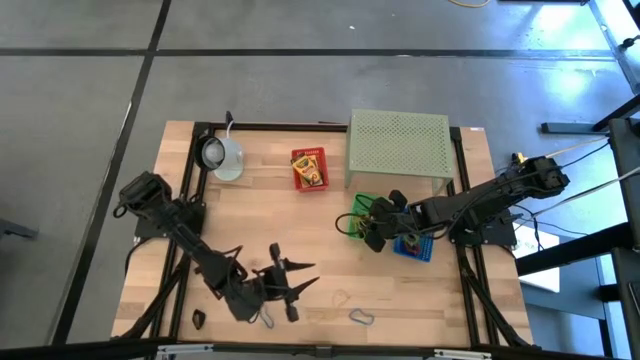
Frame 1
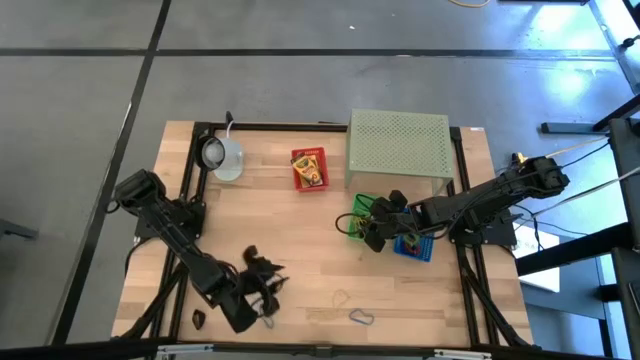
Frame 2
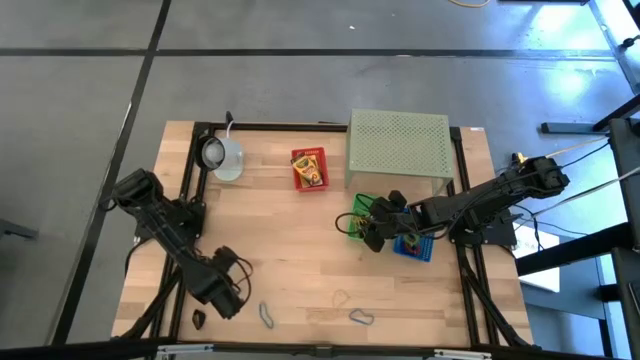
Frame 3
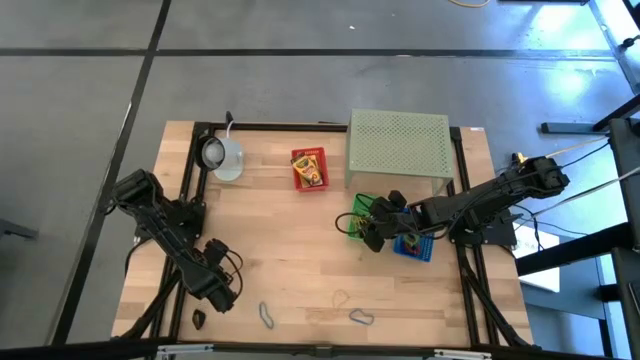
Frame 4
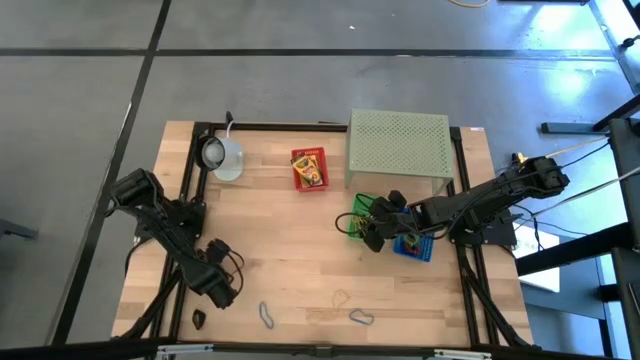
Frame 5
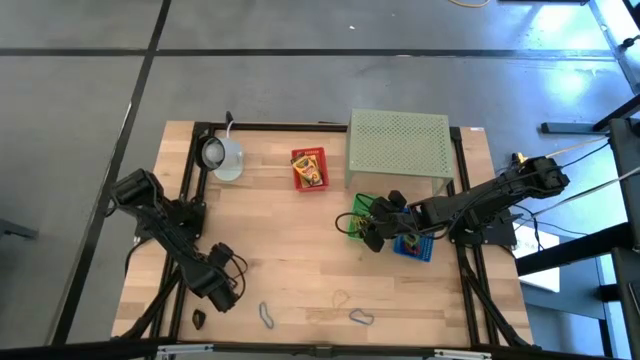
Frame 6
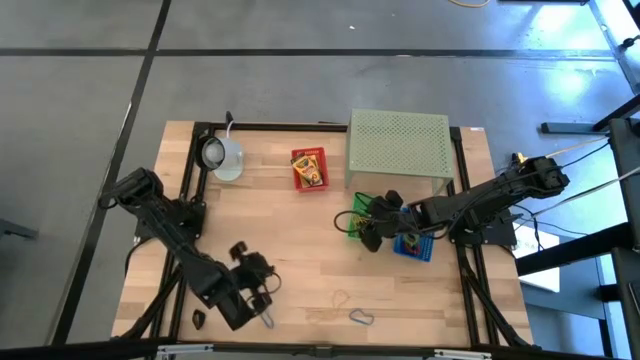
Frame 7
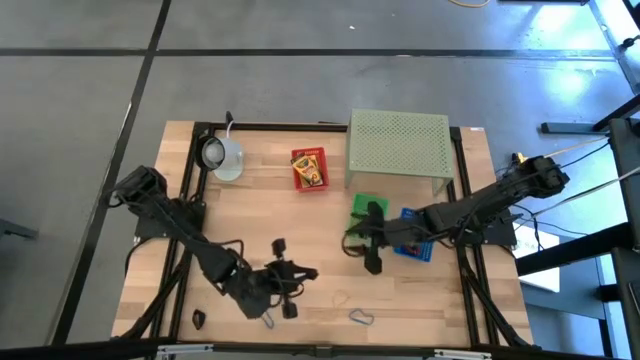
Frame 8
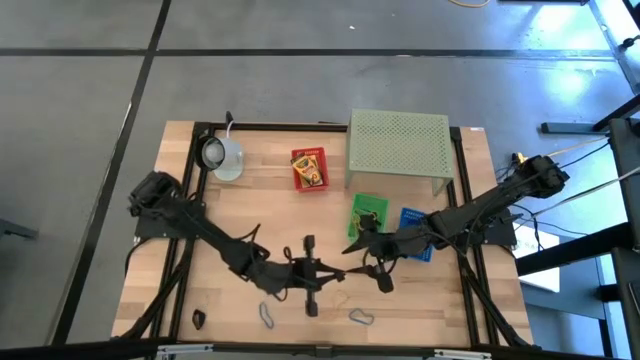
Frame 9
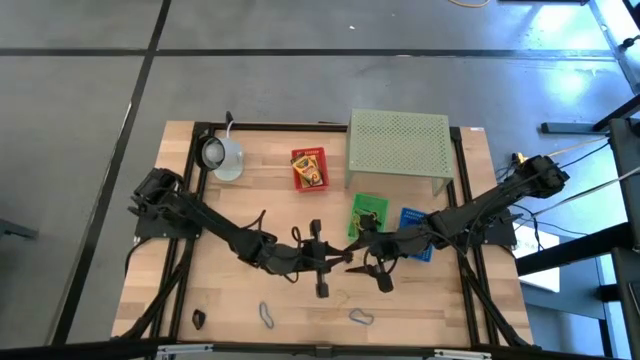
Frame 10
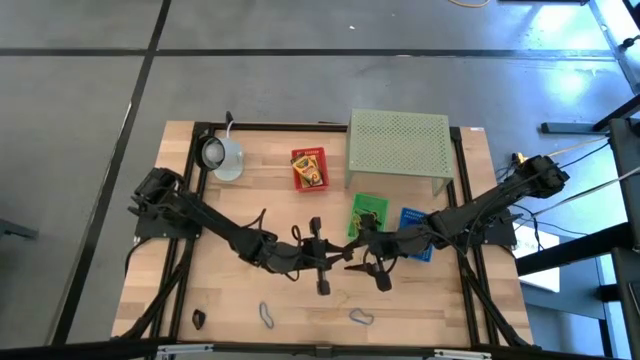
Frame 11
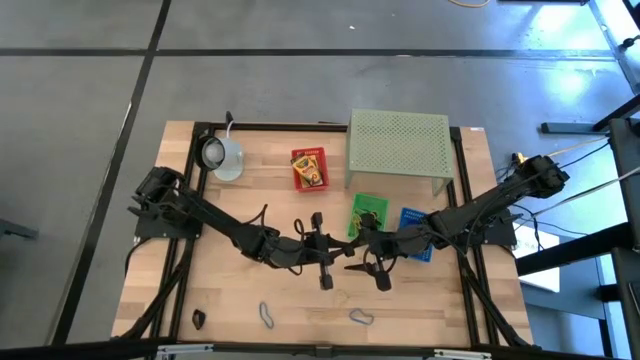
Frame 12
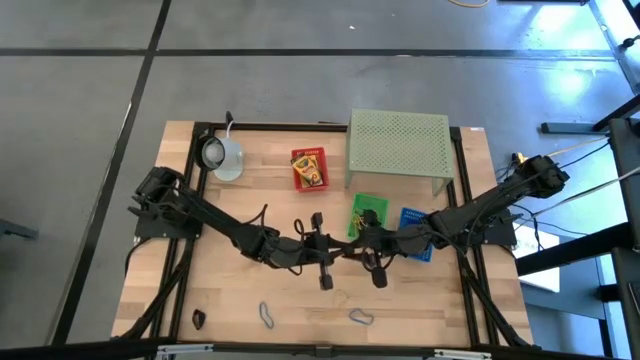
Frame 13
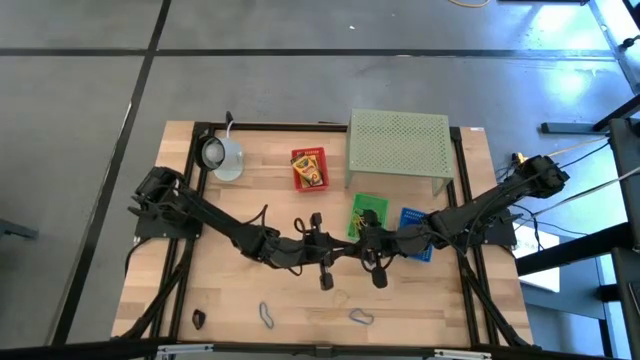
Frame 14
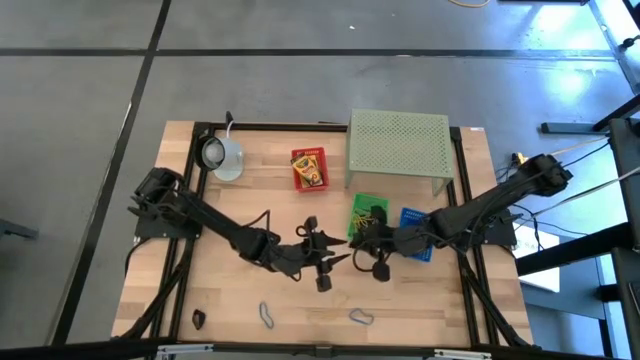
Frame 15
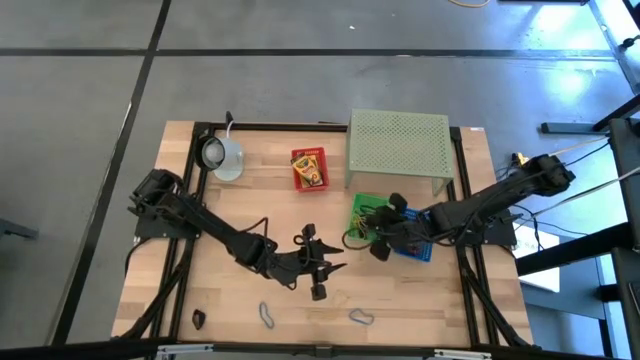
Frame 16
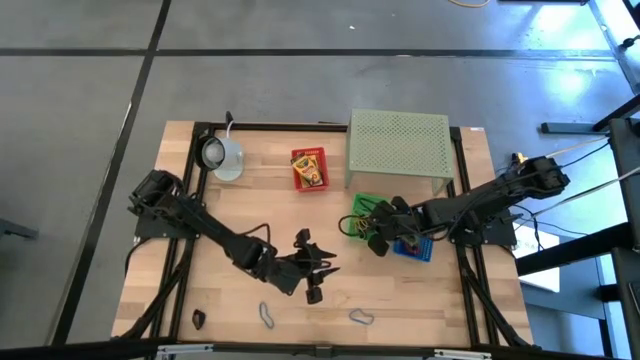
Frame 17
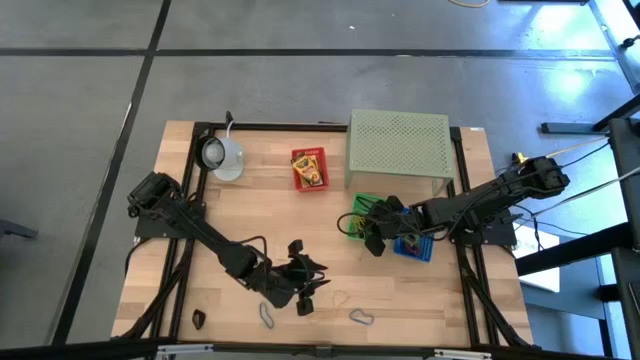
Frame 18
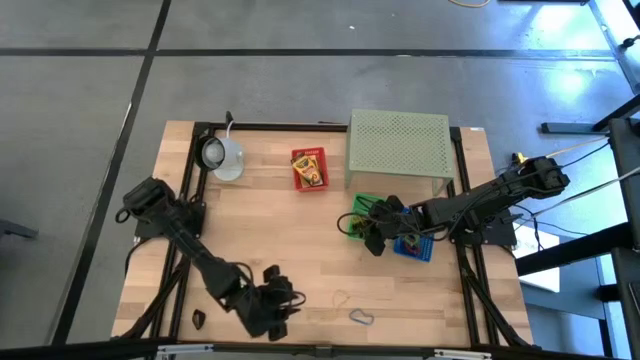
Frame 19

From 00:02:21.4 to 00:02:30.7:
Task: Pick & Place Office Desk Supplies
Put the black rubber band into the green bin

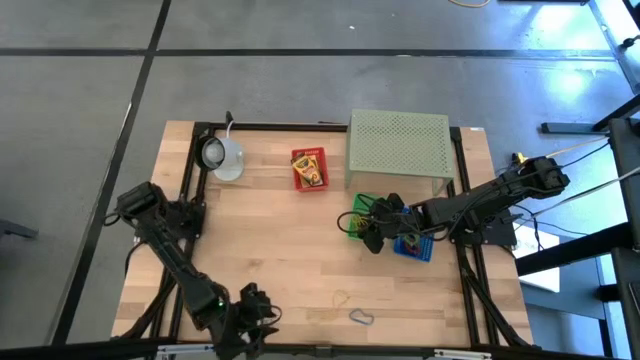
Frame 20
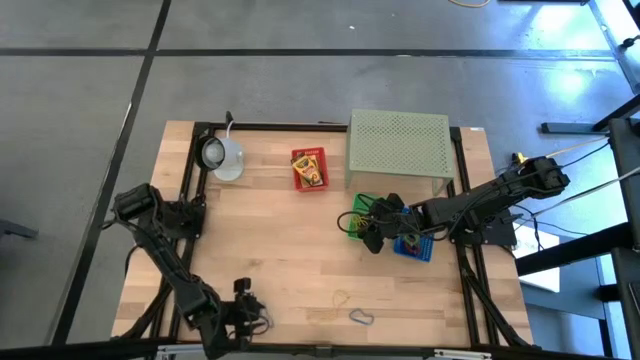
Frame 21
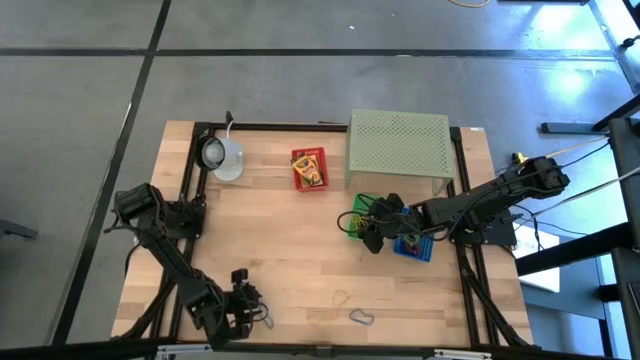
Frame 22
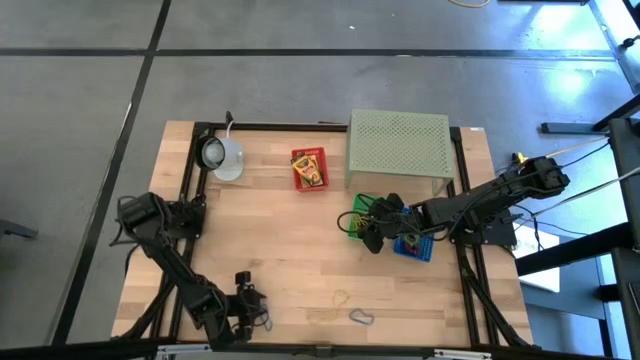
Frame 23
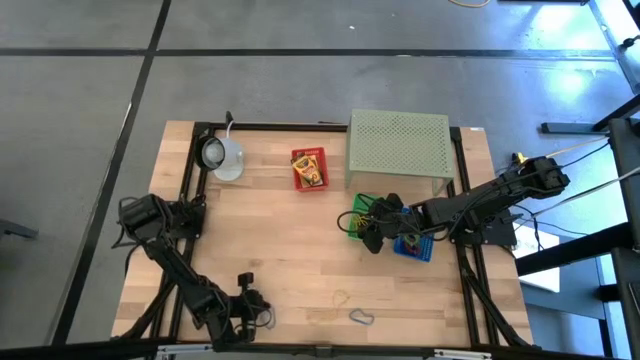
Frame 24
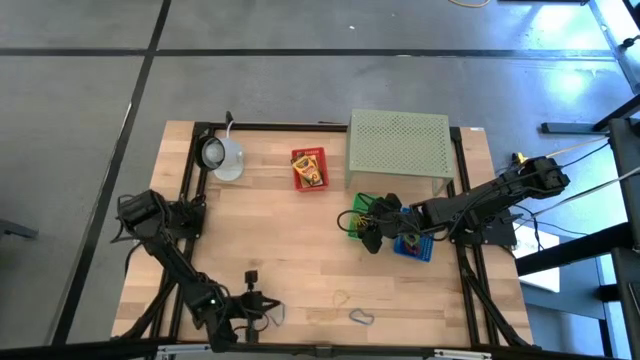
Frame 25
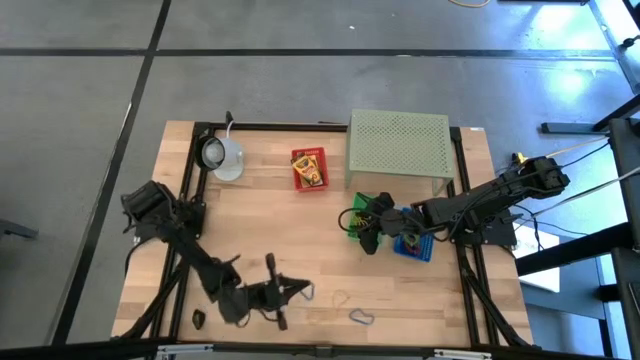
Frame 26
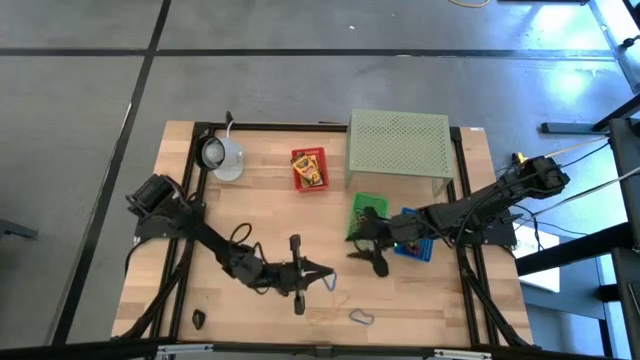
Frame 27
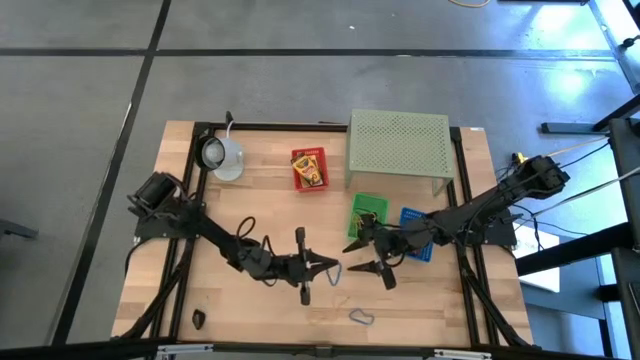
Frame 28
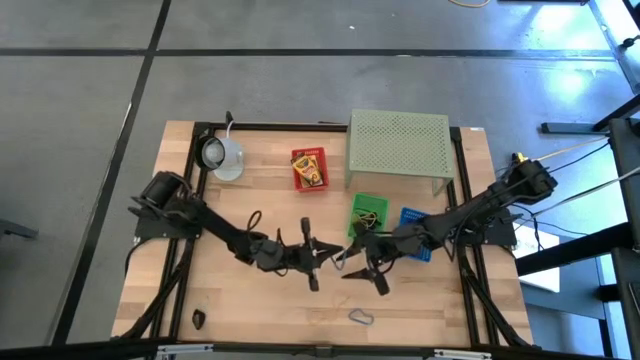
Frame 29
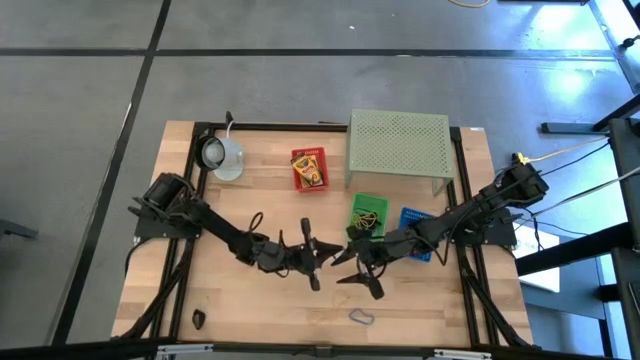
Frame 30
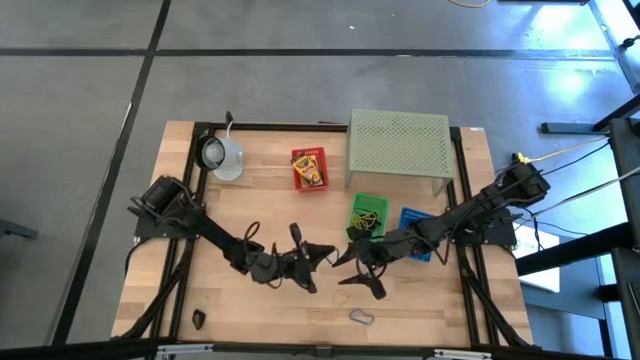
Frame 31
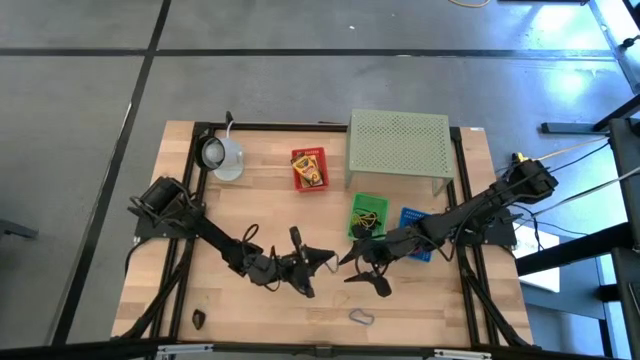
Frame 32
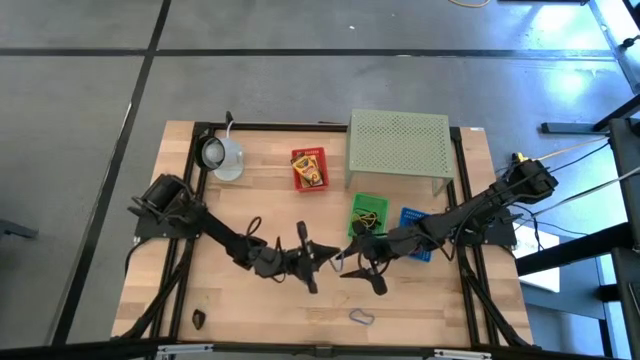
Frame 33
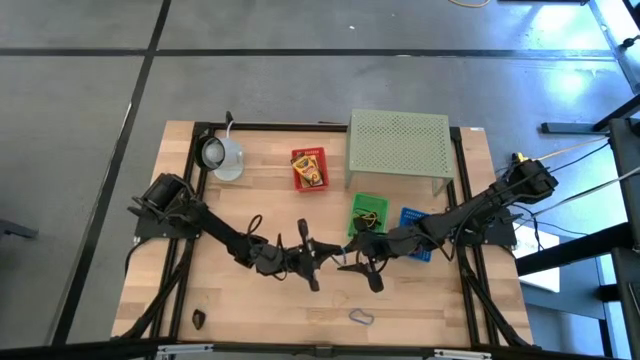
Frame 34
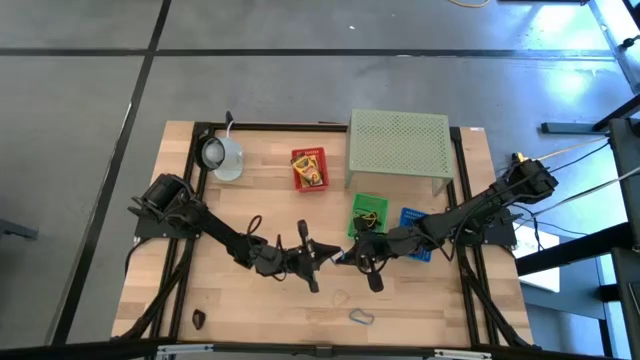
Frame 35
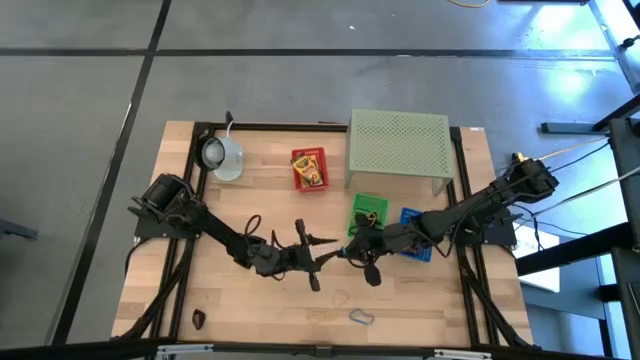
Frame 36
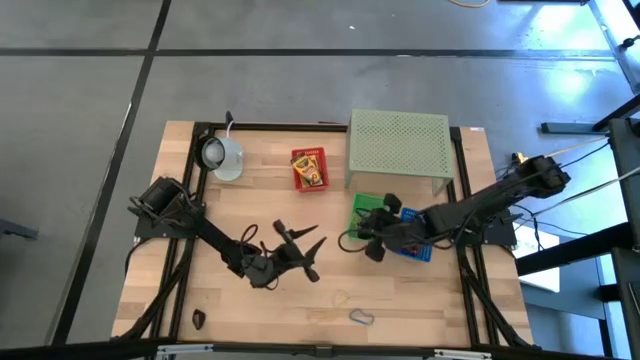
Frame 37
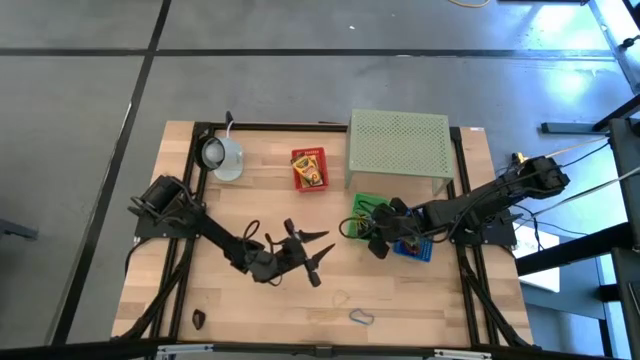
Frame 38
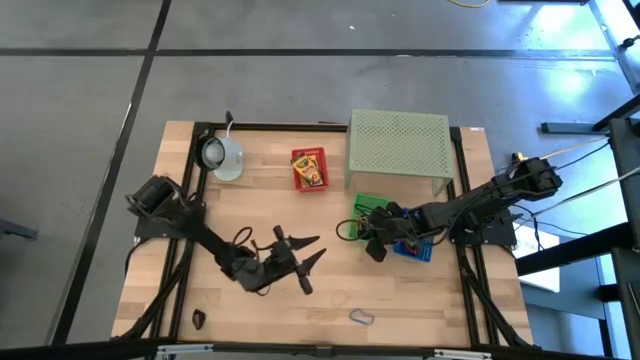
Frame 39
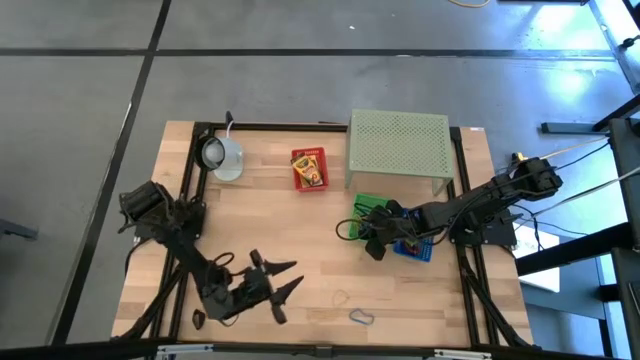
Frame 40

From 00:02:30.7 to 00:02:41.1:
Put the blue rubber band into the green bin

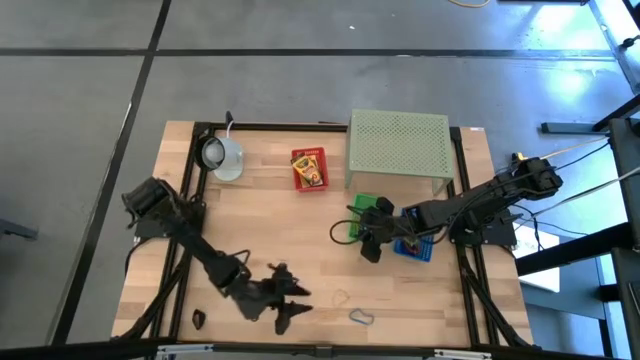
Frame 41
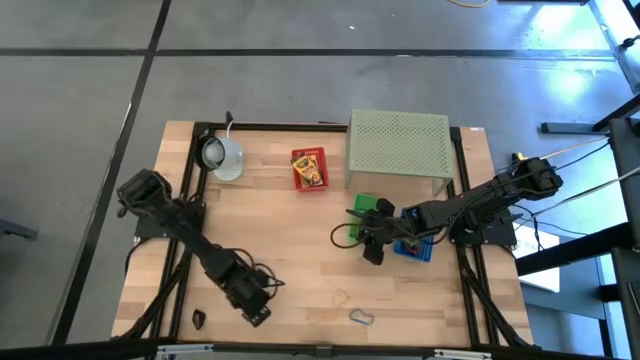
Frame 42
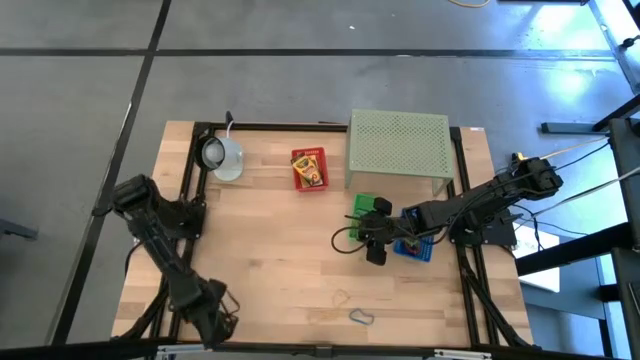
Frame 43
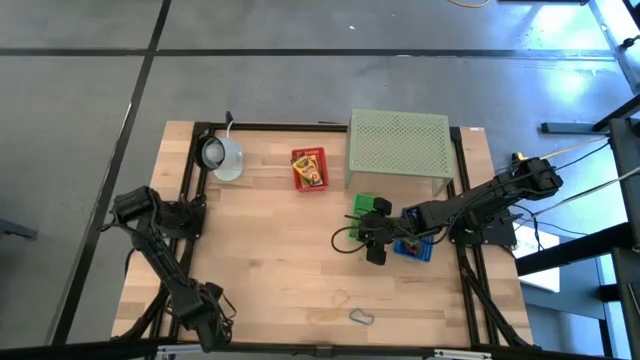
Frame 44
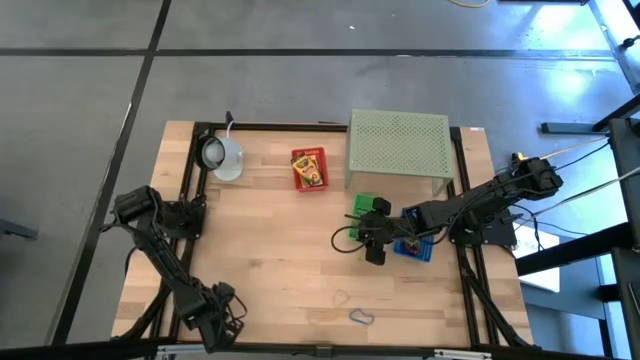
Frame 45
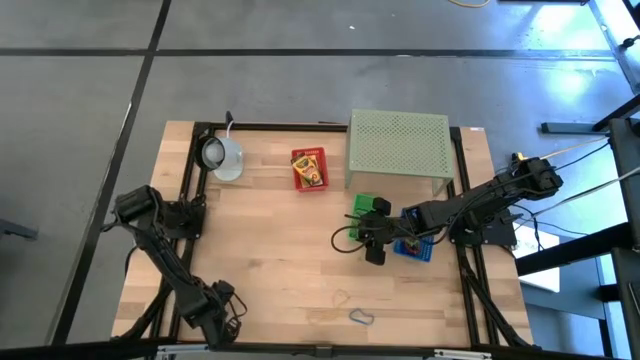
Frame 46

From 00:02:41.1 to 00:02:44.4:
Put the black rubber band into the green bin
